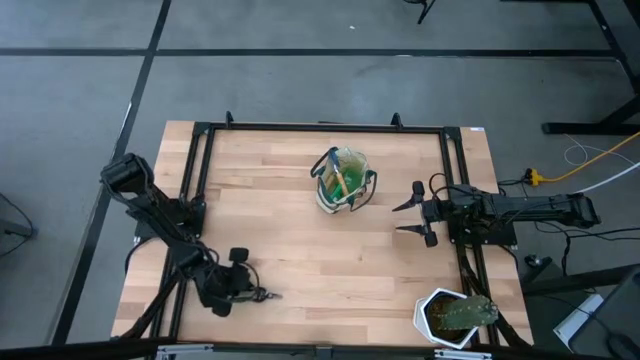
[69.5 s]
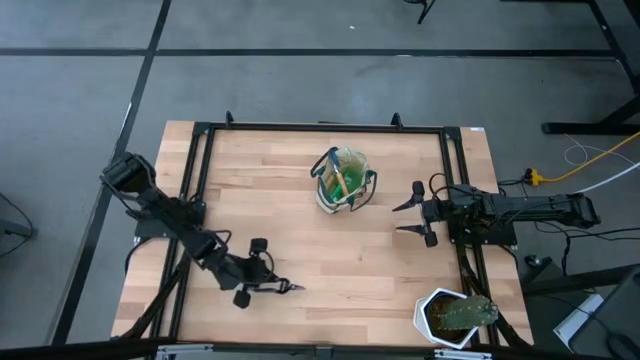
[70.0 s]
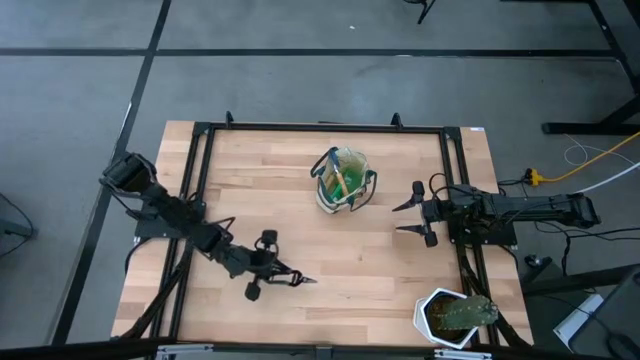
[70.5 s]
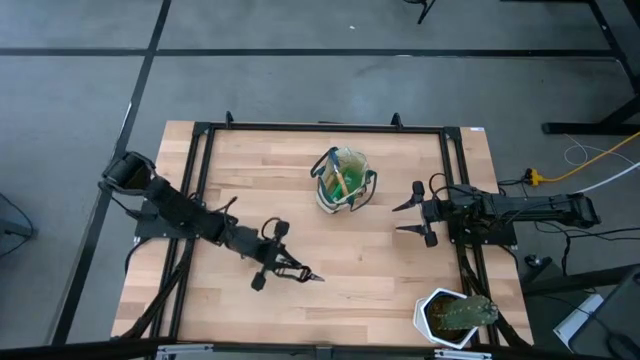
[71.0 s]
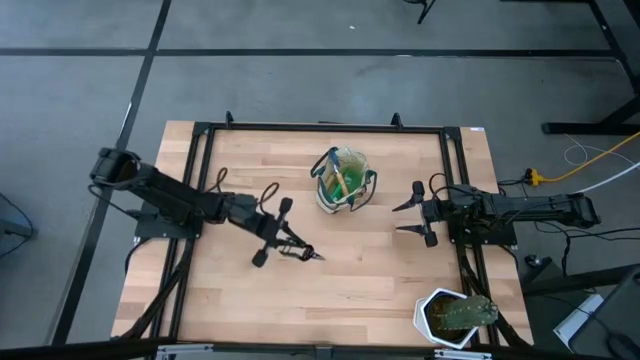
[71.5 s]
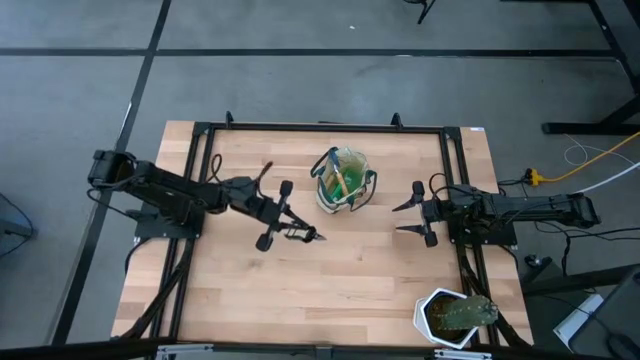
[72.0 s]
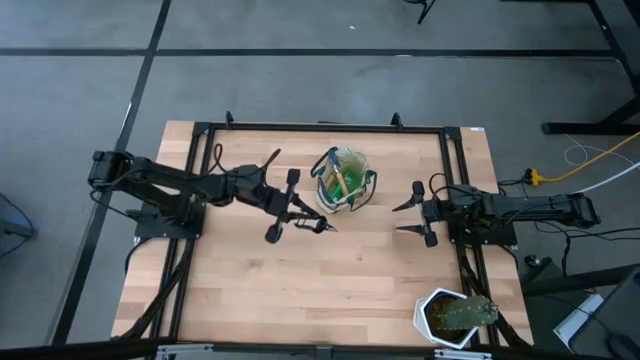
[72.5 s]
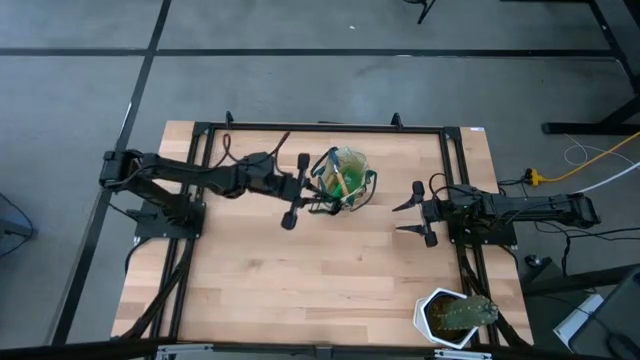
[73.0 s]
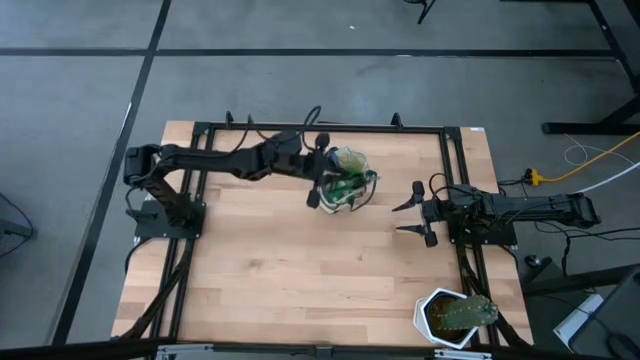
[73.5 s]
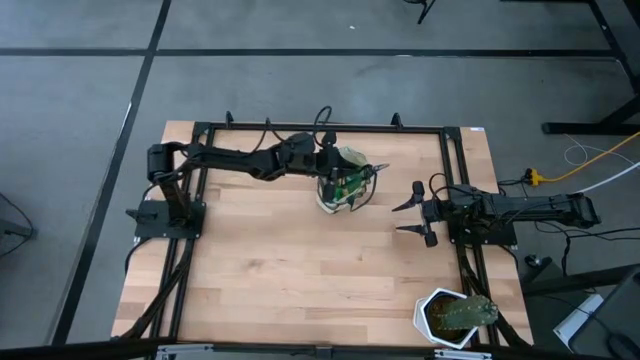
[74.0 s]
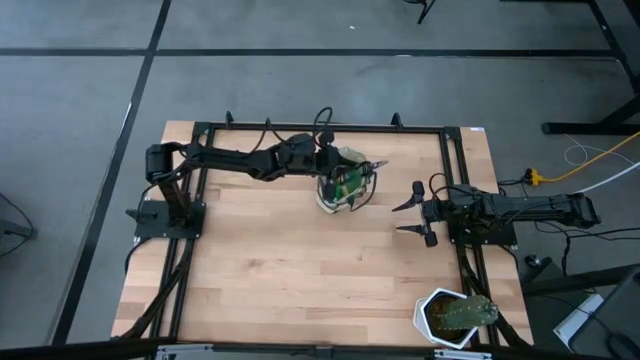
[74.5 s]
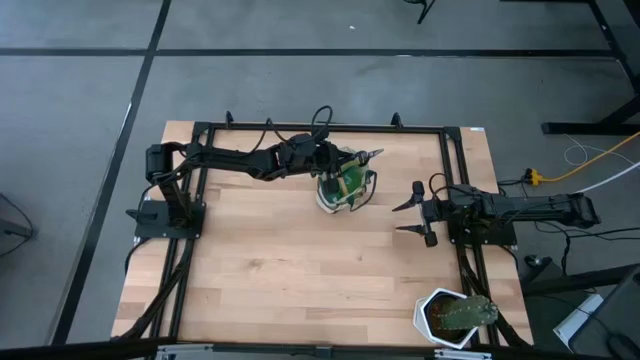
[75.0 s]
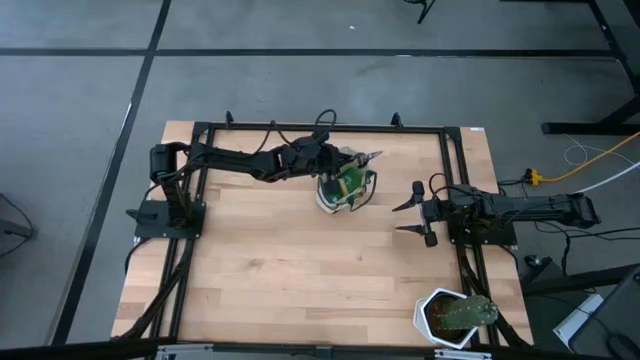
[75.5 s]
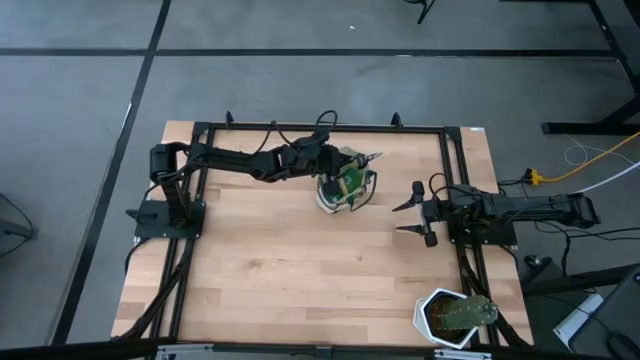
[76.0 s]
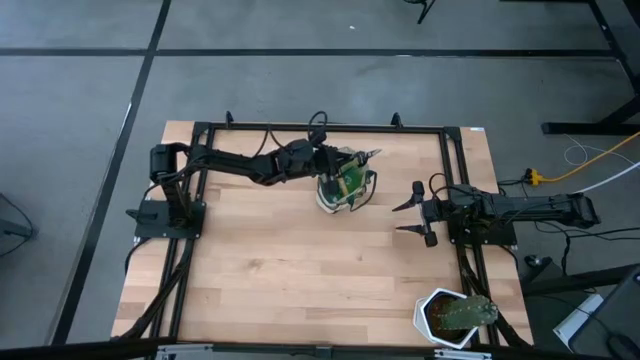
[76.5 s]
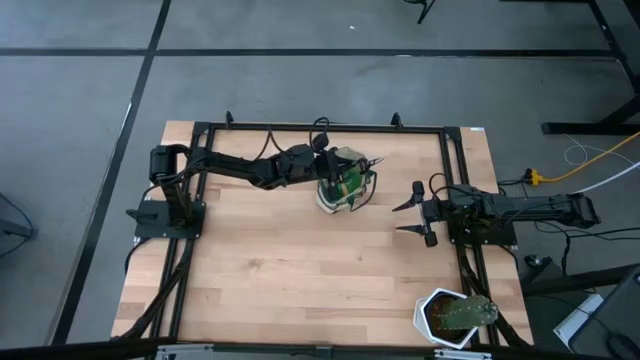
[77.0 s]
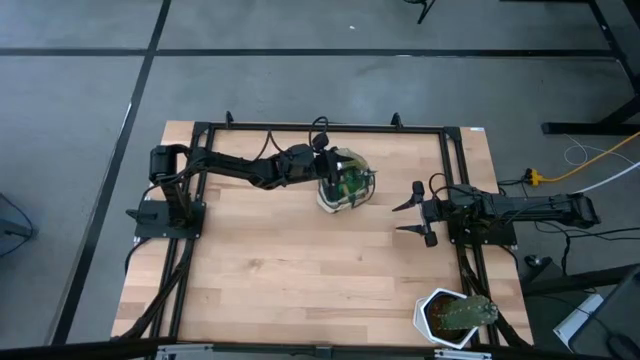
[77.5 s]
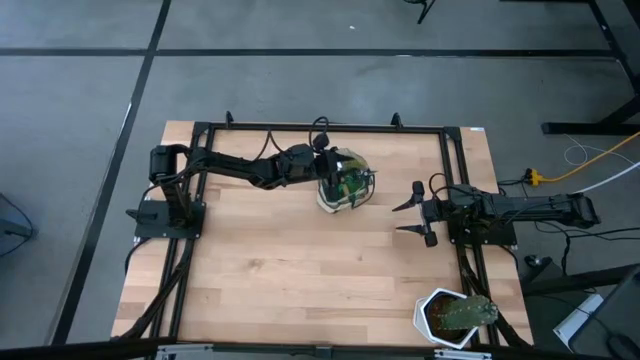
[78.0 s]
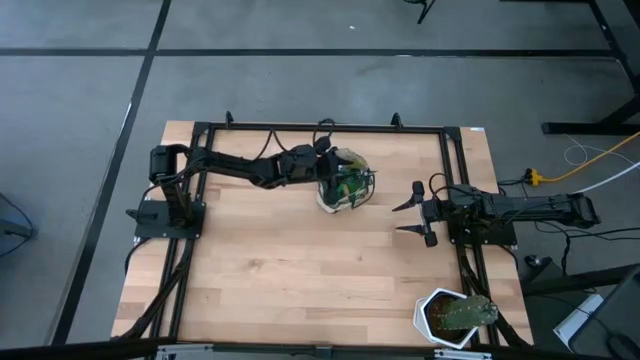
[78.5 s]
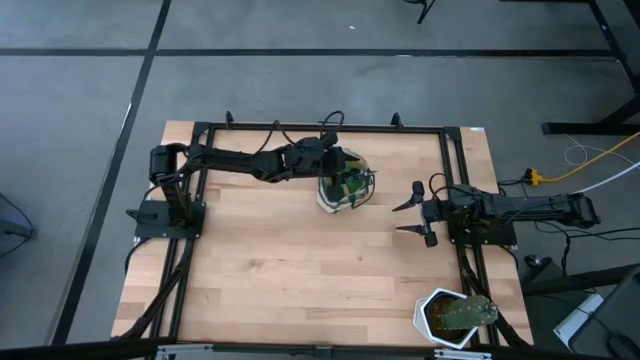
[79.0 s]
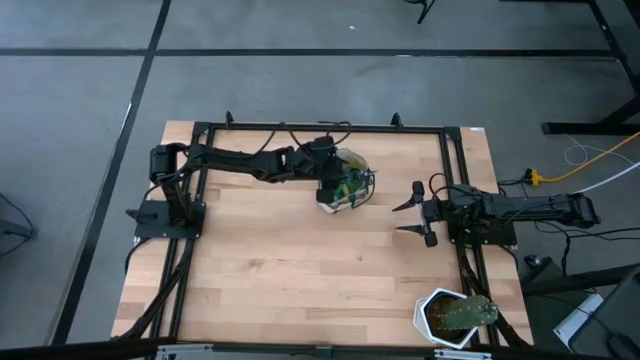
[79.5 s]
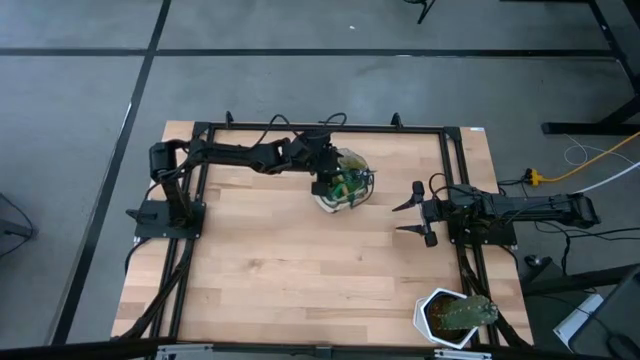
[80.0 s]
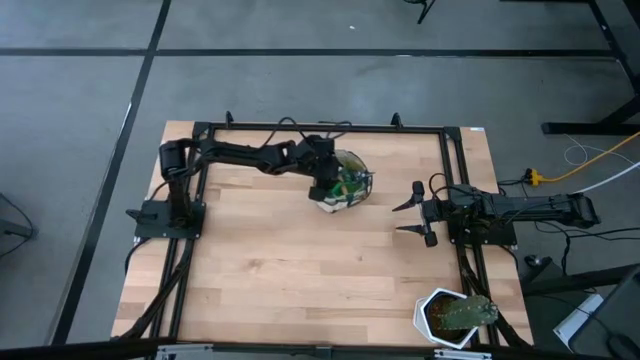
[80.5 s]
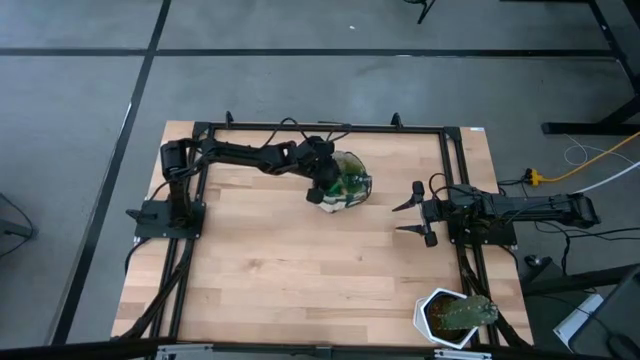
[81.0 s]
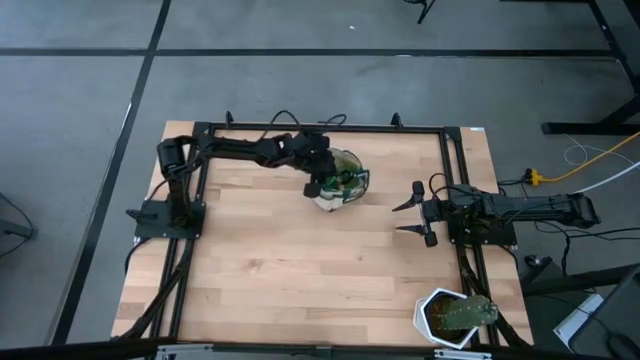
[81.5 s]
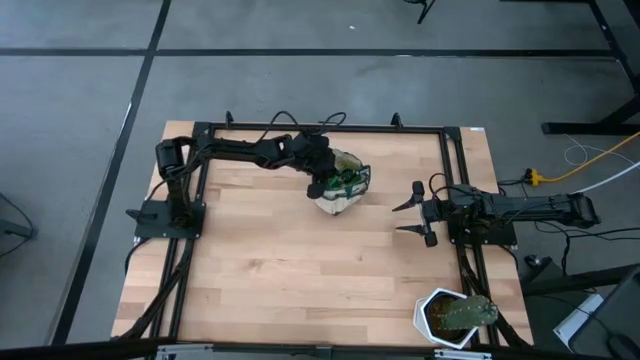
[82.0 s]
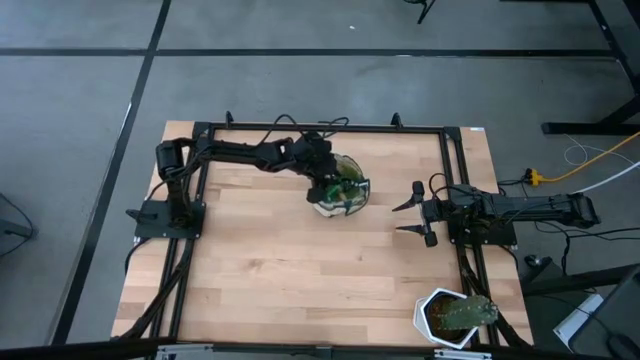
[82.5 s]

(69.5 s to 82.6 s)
Task: Pick & Place Garden tools in Gardening bag
Put the shear scissors into the gardening bag

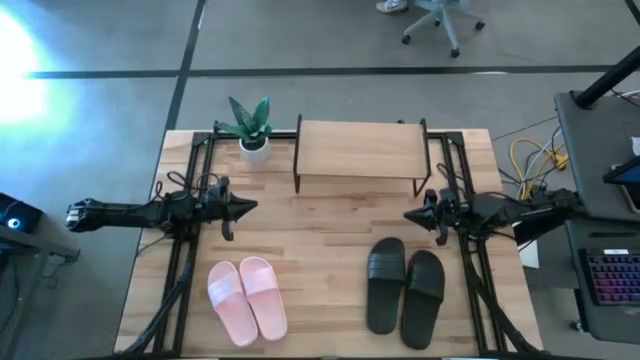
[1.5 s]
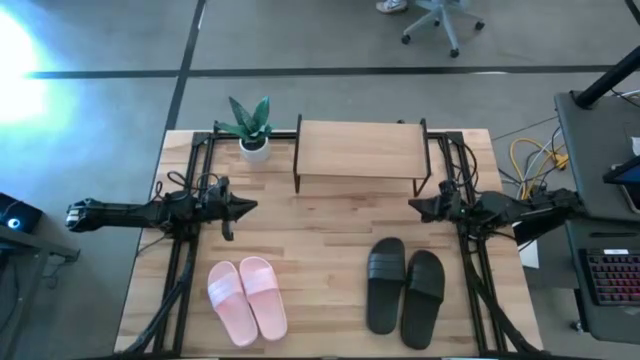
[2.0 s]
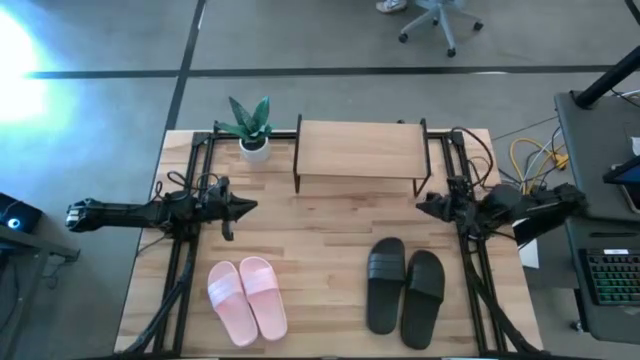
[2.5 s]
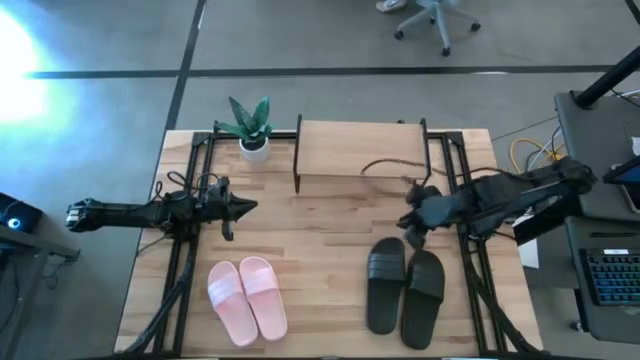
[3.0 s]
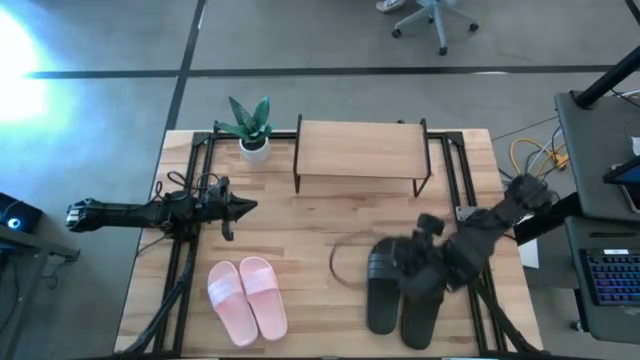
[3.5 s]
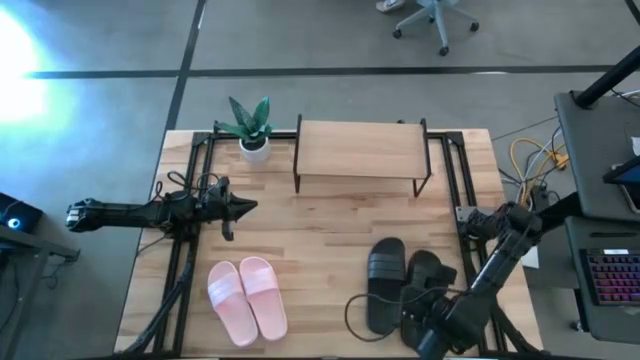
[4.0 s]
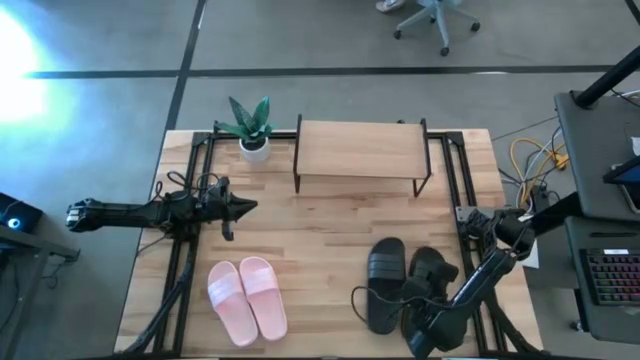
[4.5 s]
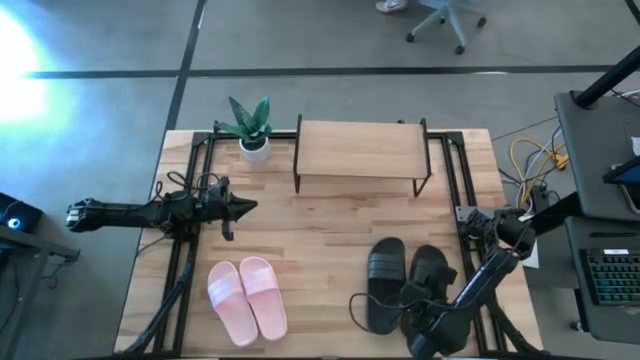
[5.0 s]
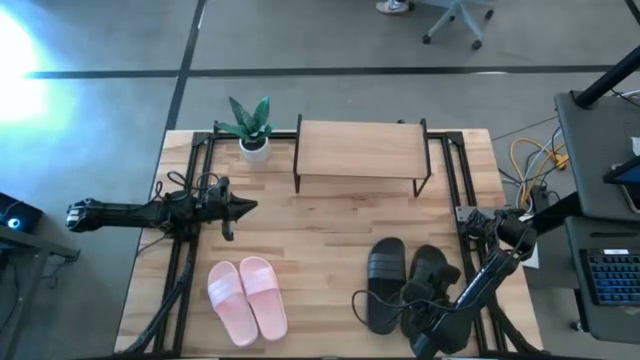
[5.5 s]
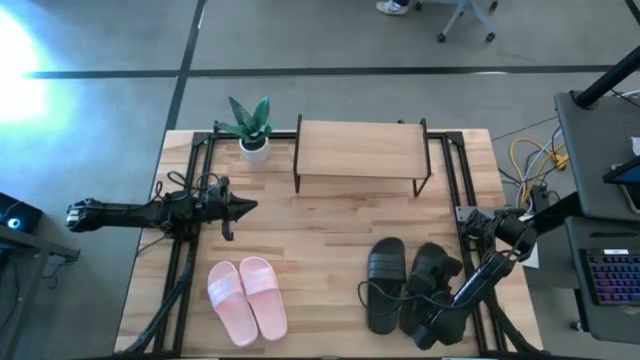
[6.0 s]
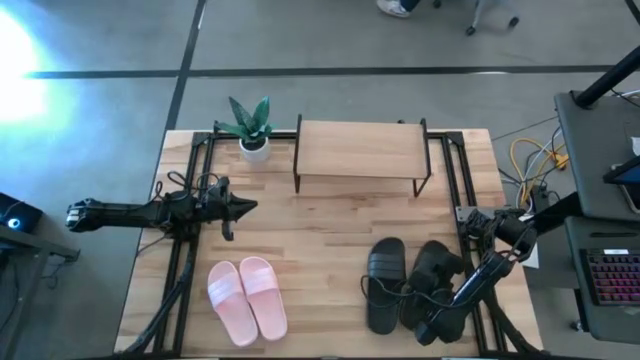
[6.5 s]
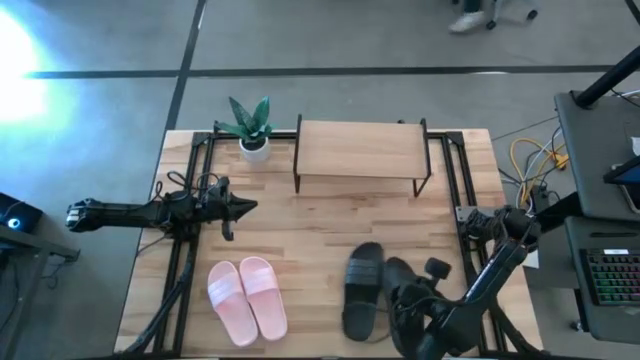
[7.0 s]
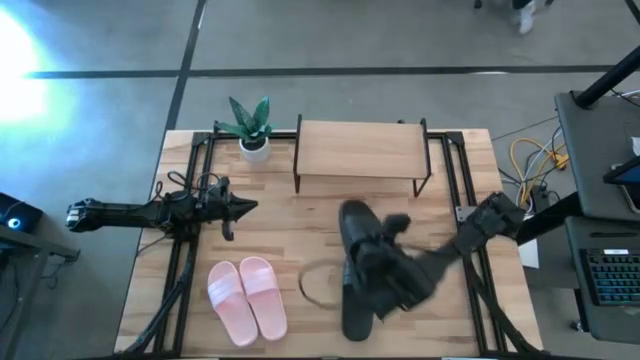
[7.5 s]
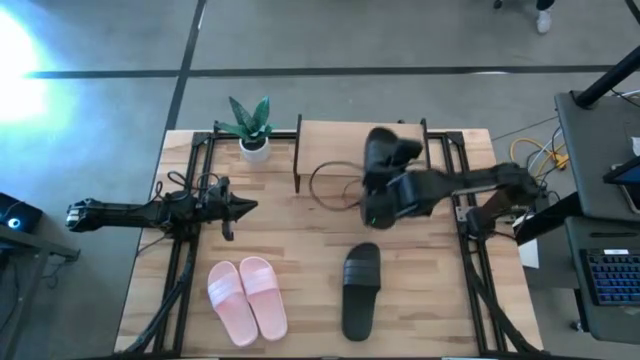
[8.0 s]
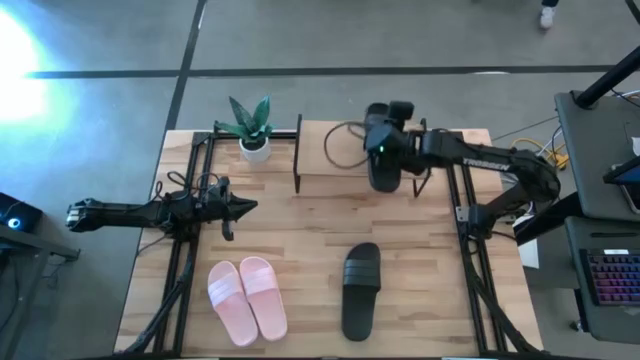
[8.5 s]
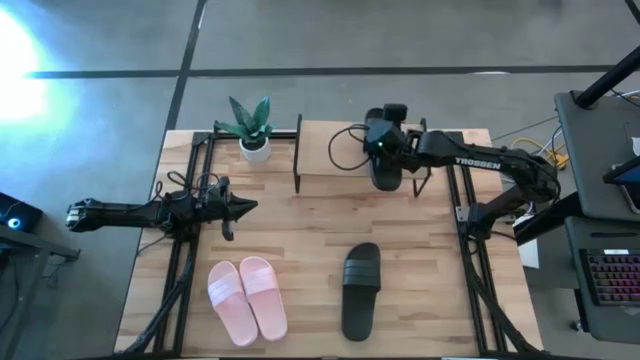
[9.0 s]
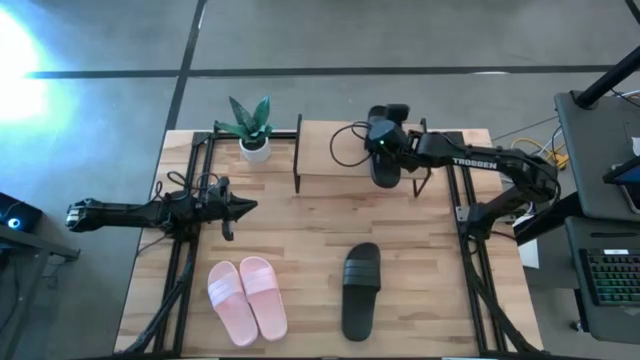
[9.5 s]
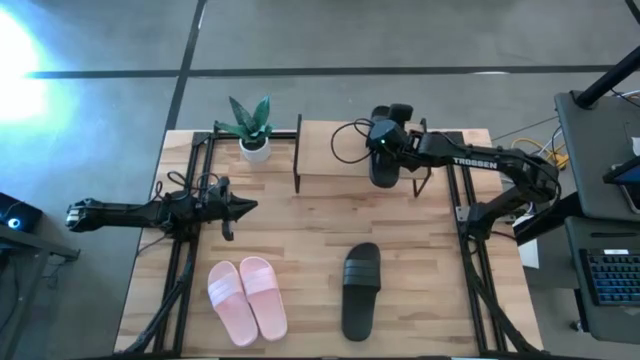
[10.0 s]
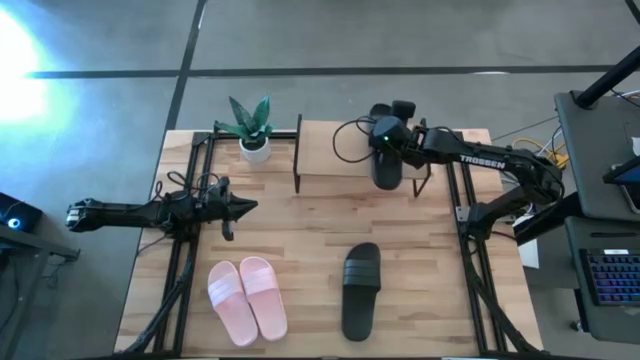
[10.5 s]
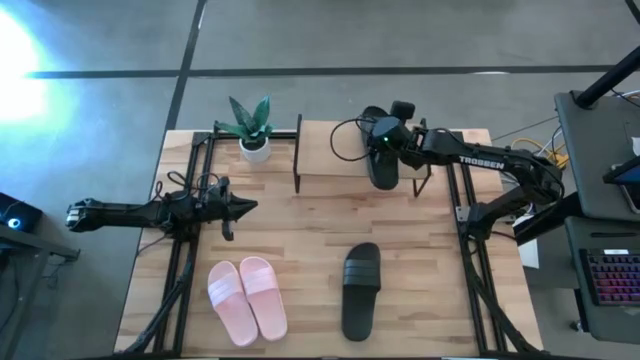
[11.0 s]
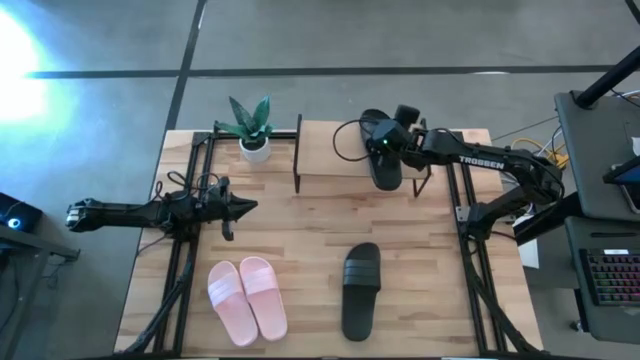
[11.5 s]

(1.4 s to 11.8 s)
Task: Pick and place slides into the shelf
Put the right black slipper on the shelf
